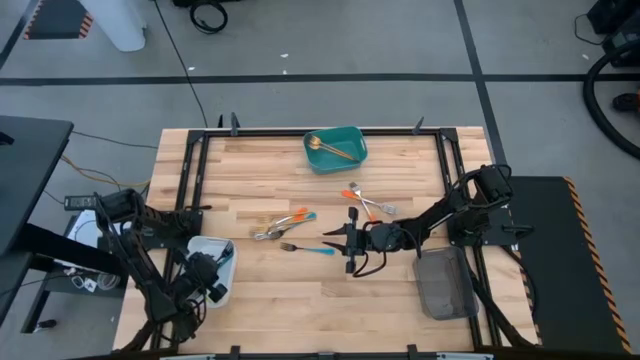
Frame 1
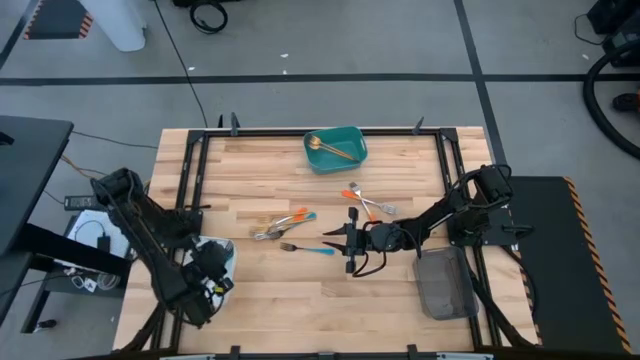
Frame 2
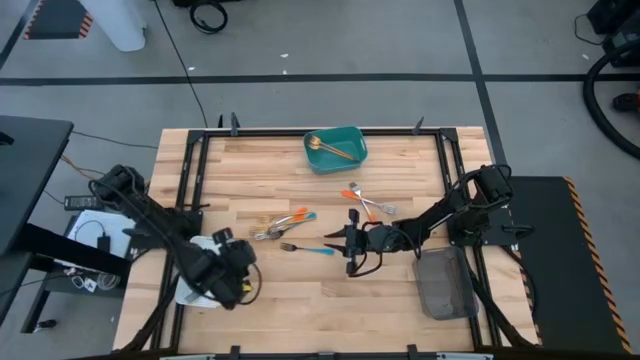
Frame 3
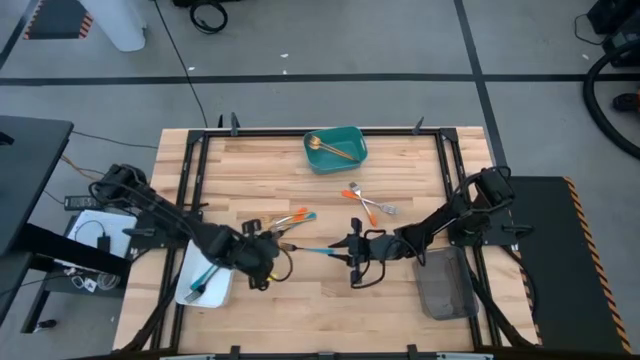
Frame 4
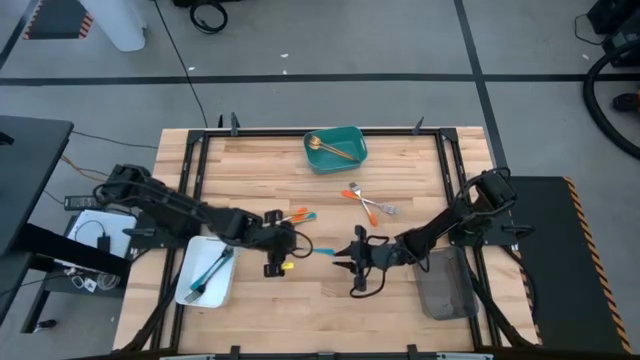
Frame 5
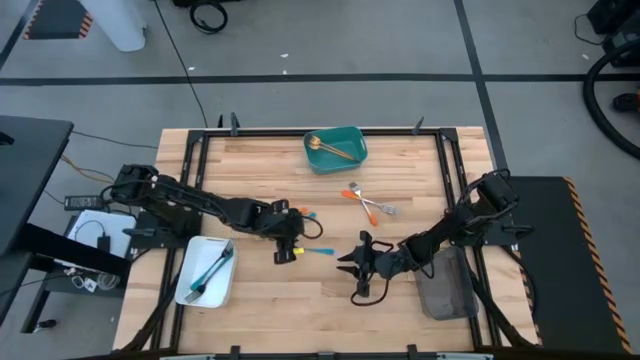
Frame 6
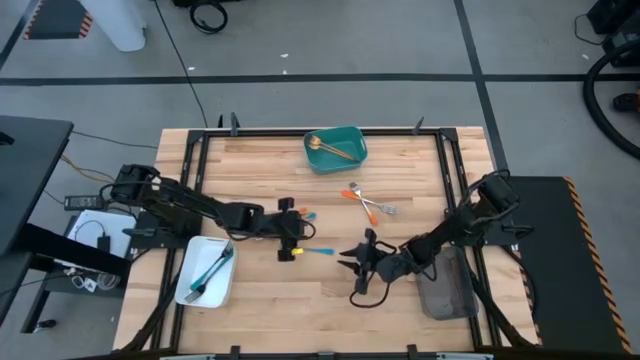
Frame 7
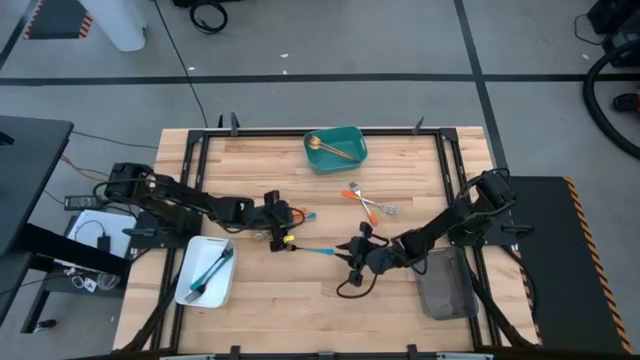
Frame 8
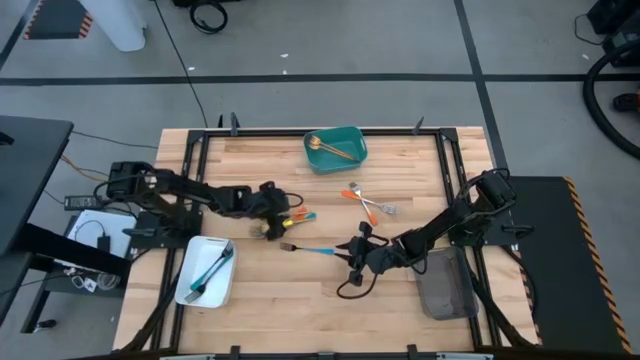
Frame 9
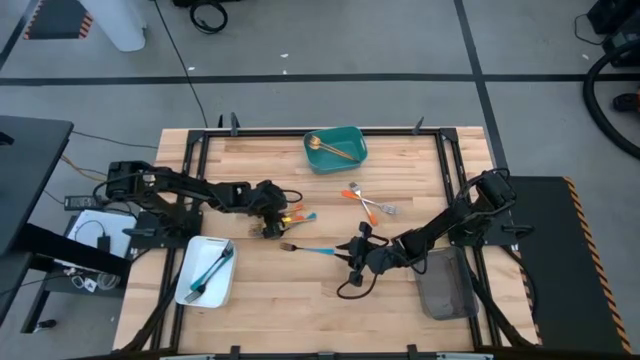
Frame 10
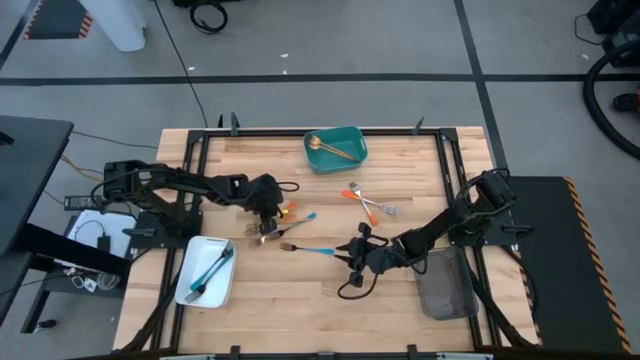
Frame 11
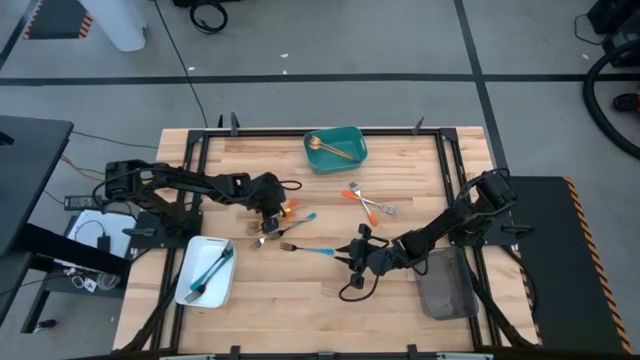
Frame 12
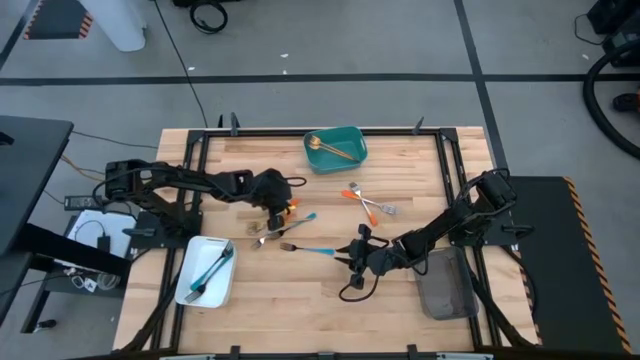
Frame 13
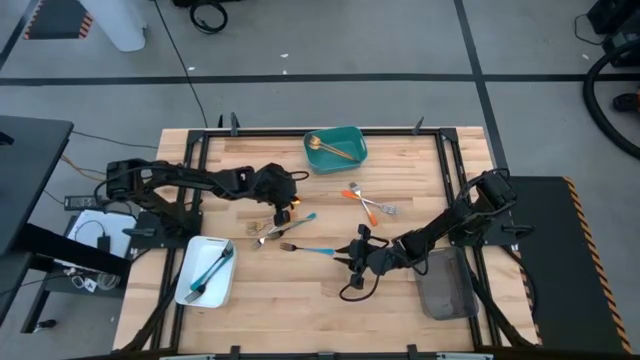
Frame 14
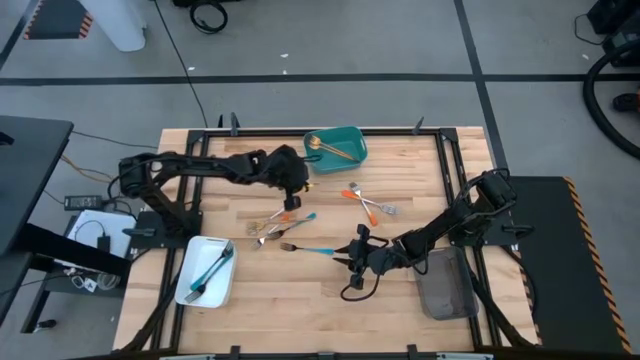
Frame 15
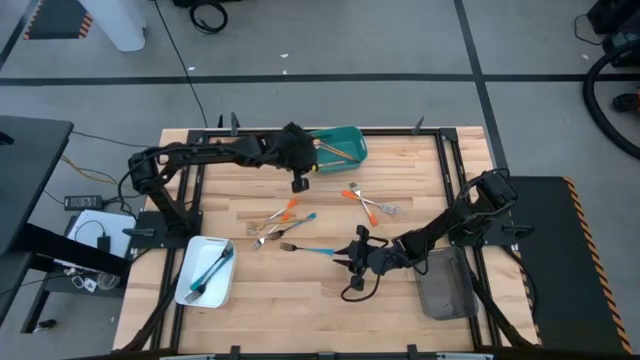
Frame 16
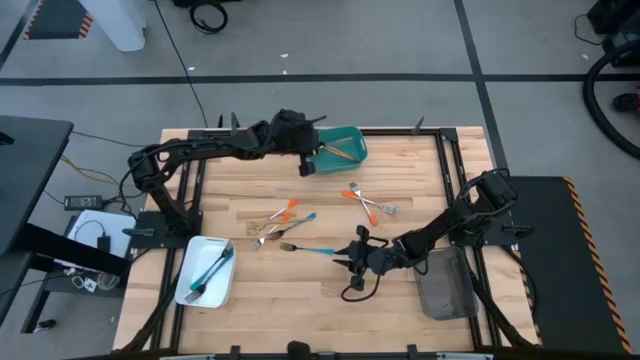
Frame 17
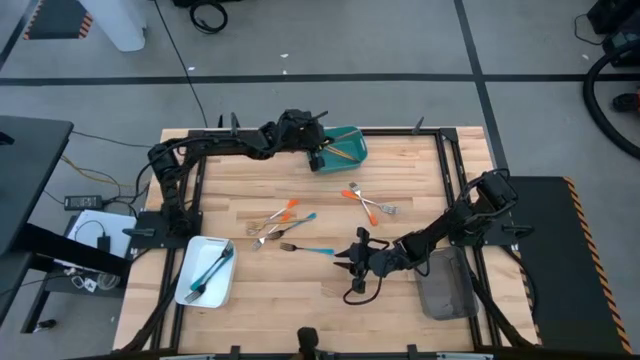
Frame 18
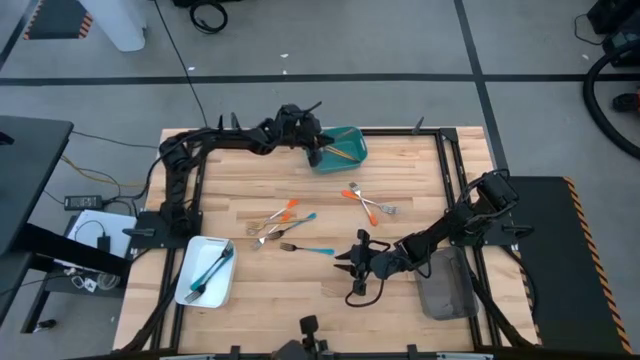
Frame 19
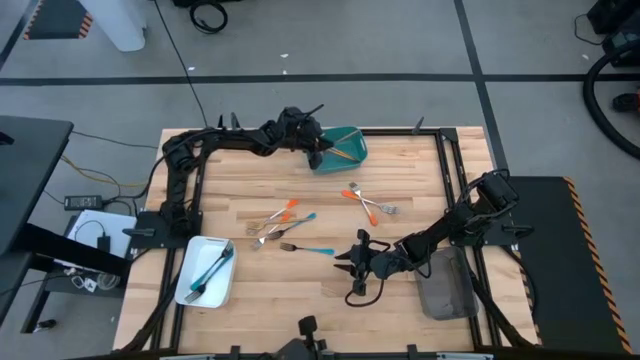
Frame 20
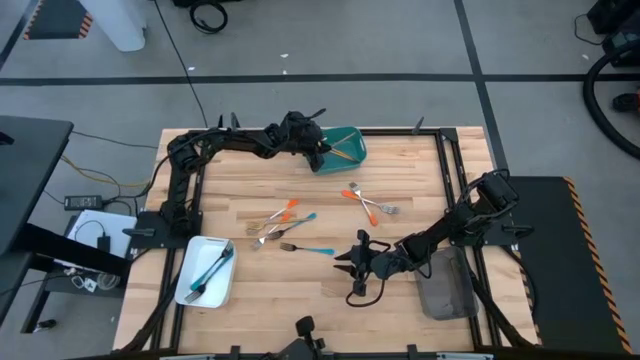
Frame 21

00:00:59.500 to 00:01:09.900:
Task: Sort silverware by color (type)
Put the gold fork into the blue bin

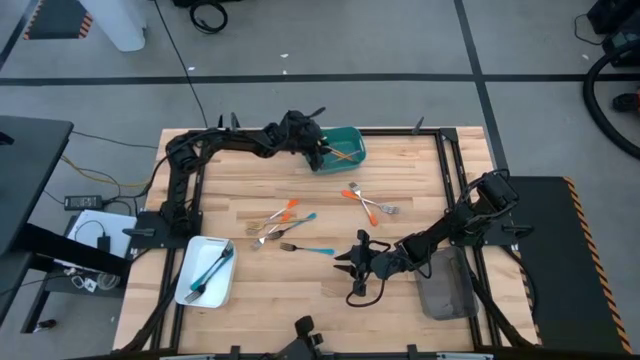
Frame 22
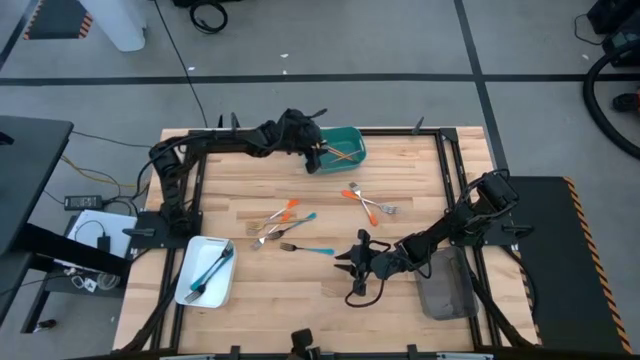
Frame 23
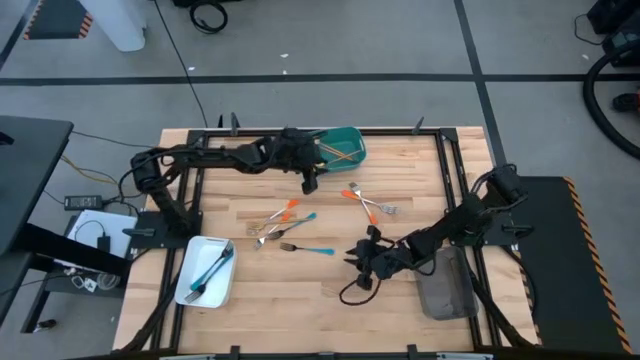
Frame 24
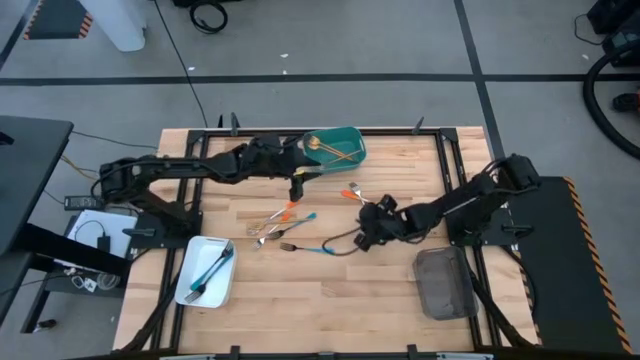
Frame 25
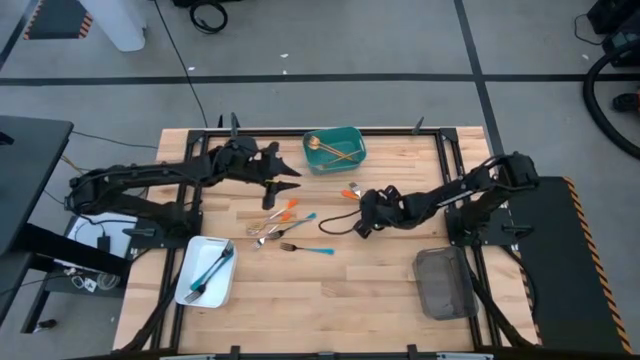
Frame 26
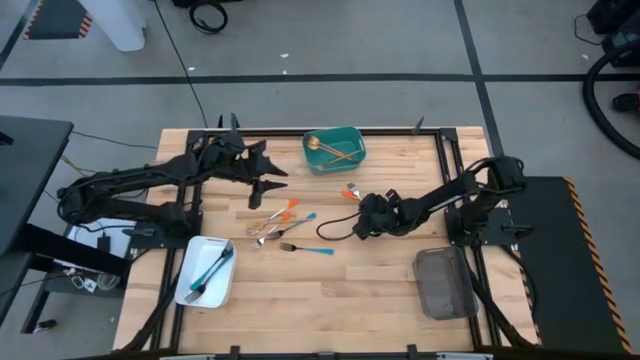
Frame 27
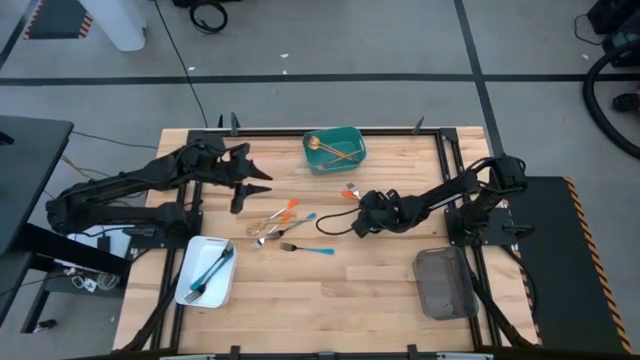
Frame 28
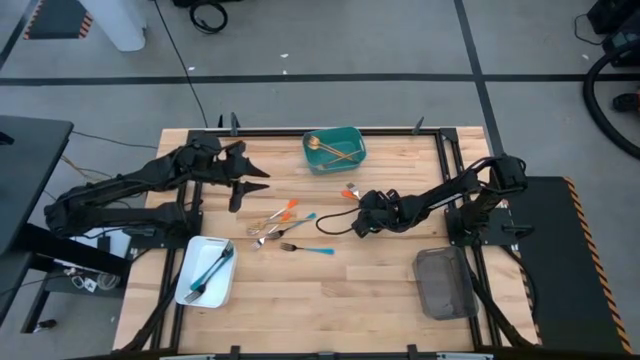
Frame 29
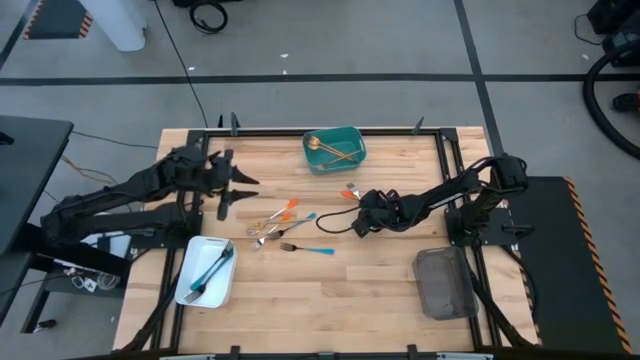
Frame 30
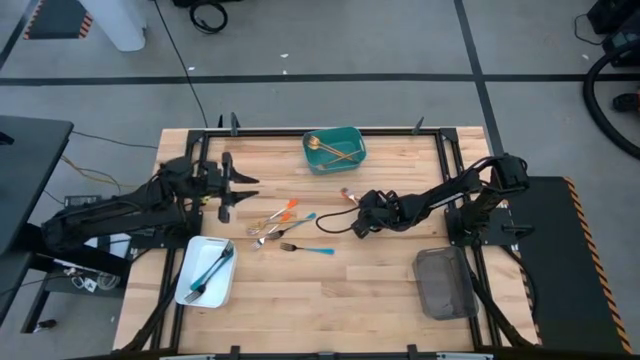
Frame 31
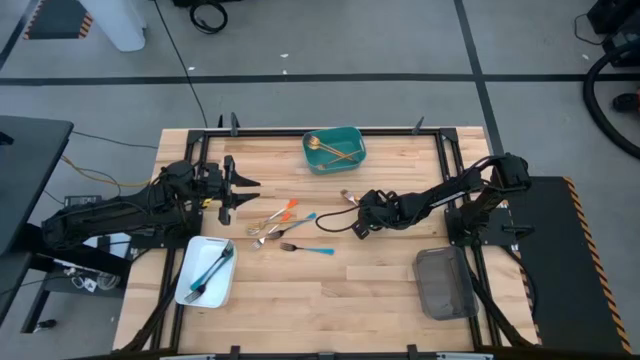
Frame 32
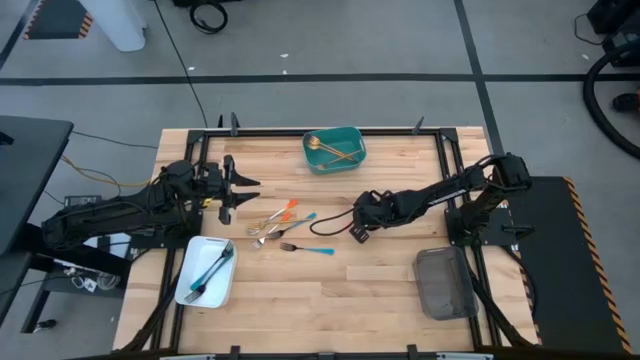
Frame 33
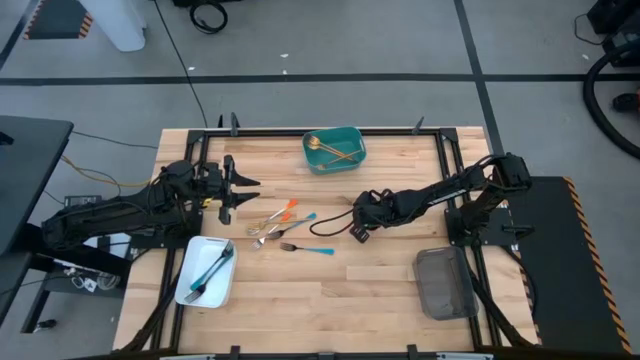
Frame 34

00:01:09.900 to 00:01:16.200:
Put the orange fork into the black bin

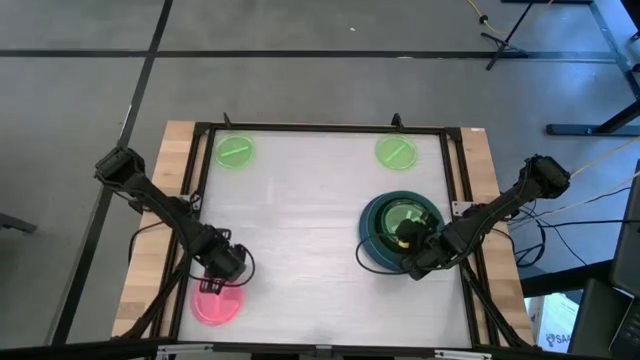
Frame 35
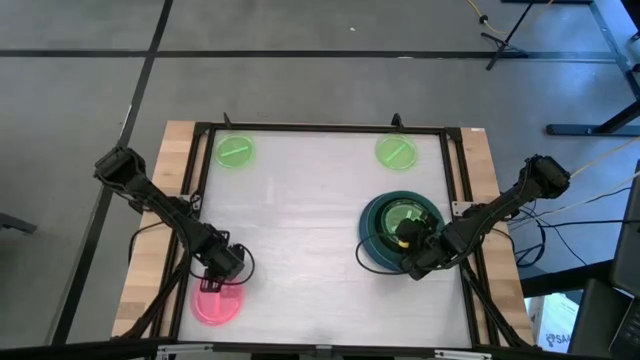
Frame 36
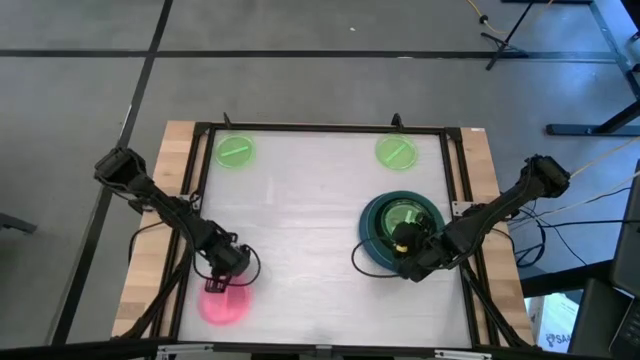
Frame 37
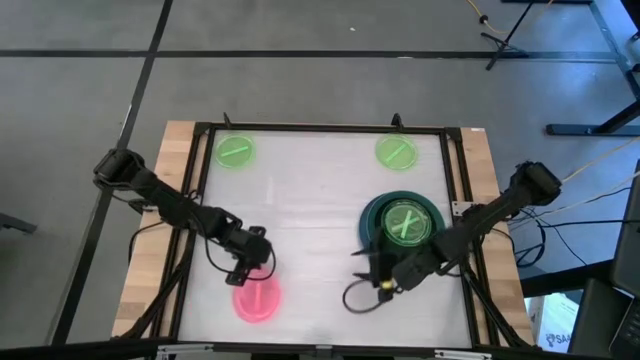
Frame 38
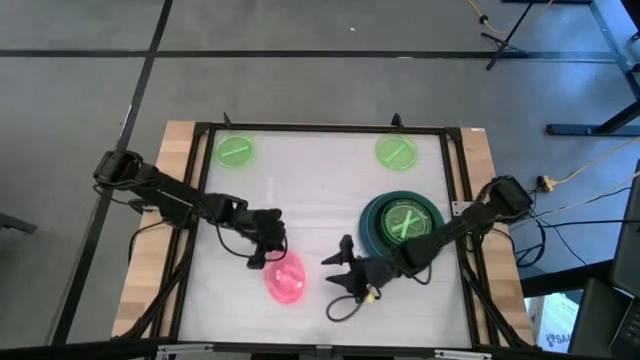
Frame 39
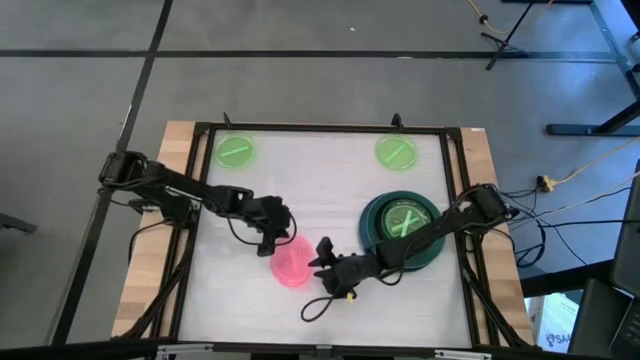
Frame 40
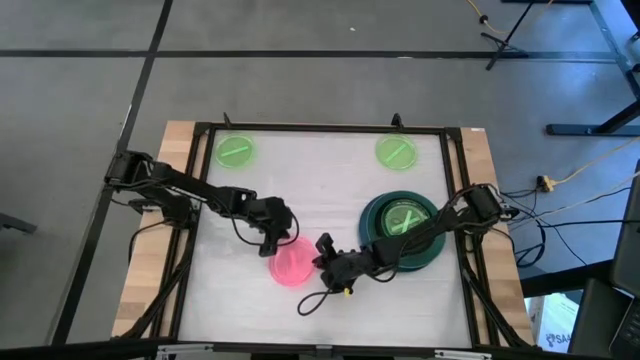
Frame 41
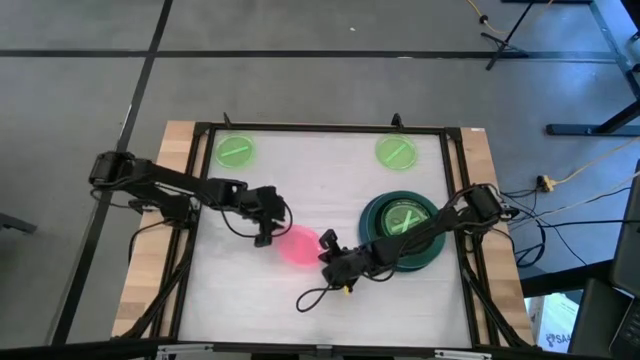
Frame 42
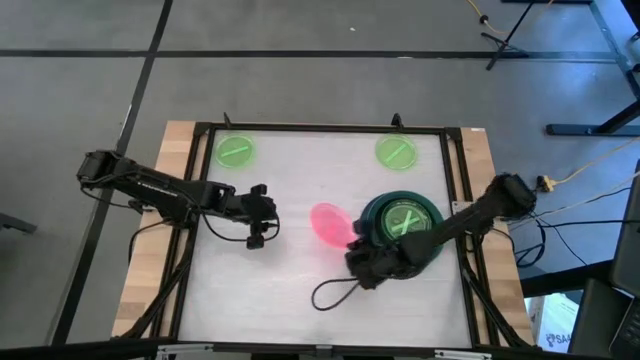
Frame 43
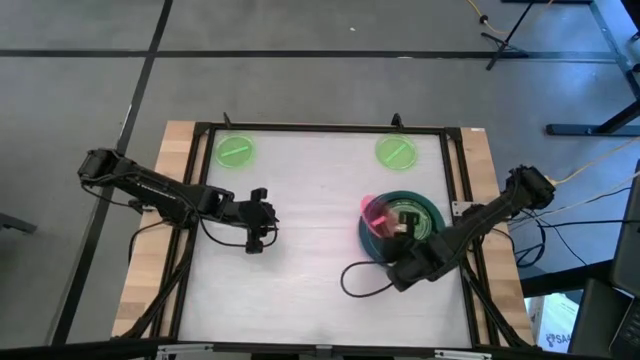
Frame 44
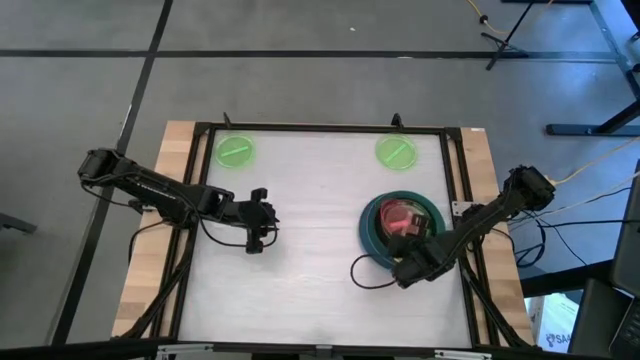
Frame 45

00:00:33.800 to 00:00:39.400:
Task: Stack plastic plates
Stack the transparent pink plate into the transparent green plate
